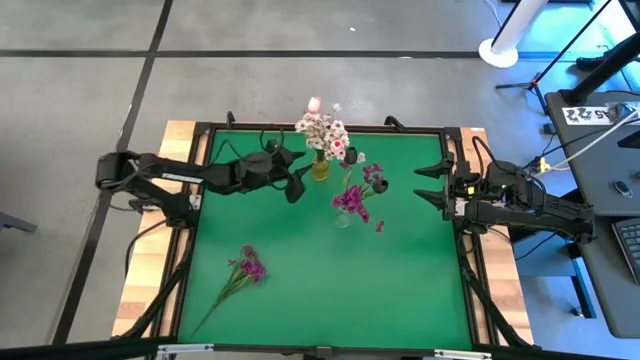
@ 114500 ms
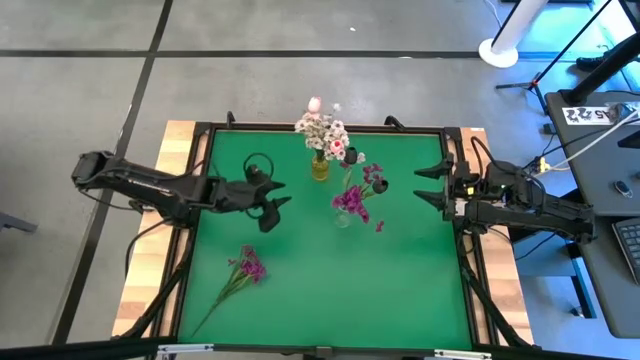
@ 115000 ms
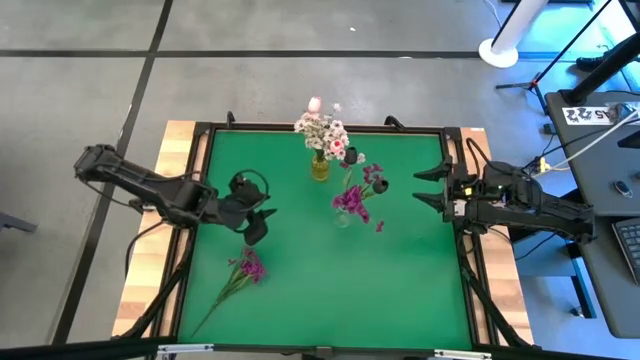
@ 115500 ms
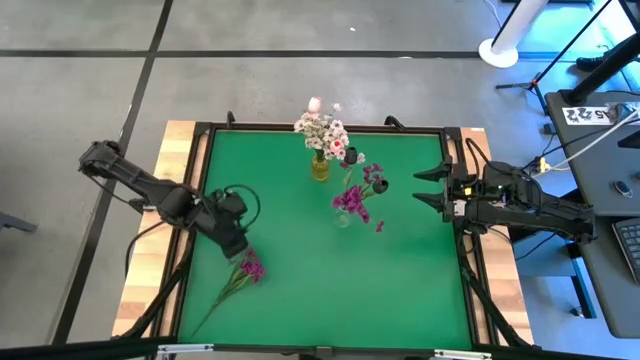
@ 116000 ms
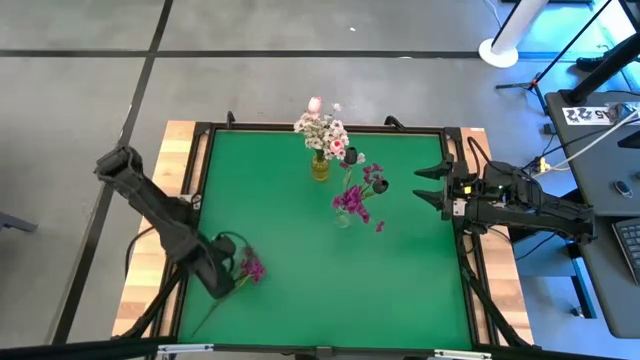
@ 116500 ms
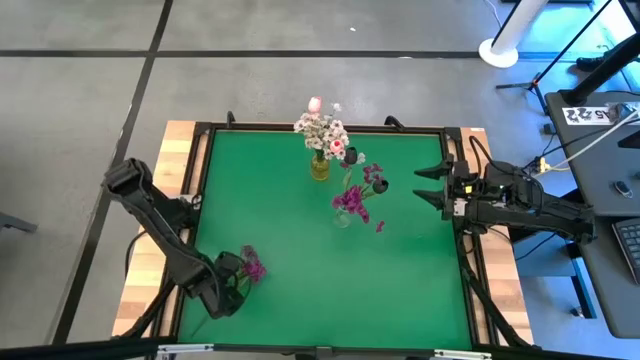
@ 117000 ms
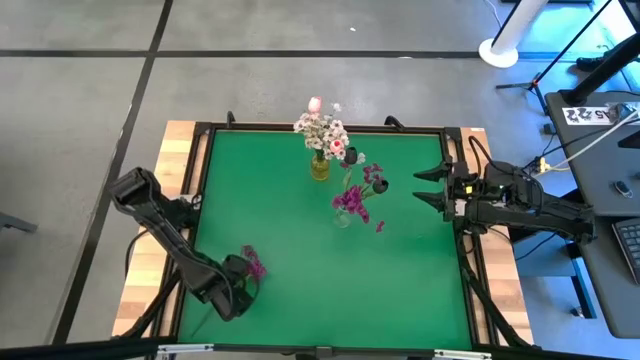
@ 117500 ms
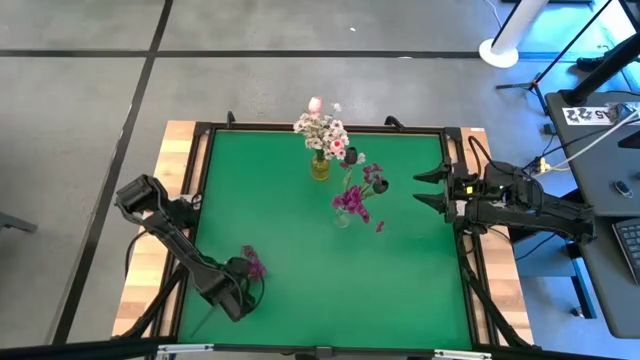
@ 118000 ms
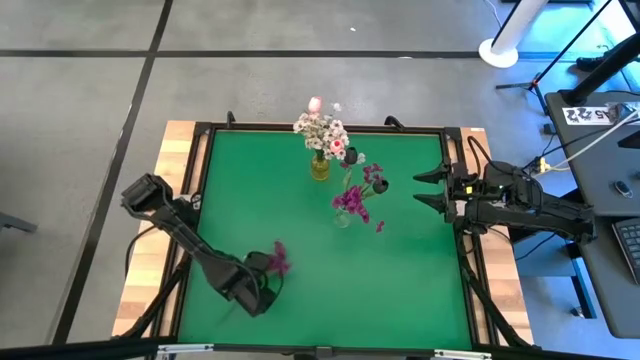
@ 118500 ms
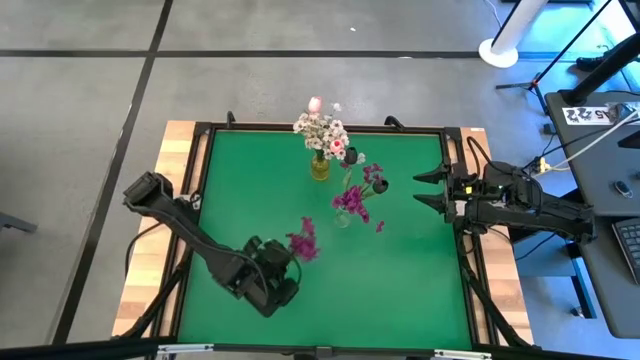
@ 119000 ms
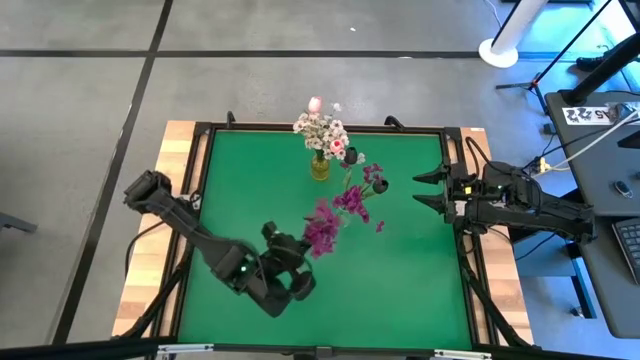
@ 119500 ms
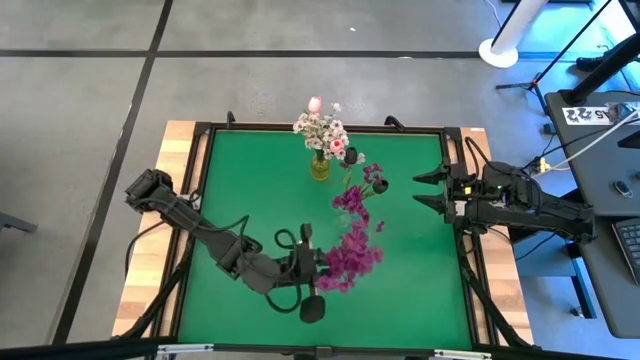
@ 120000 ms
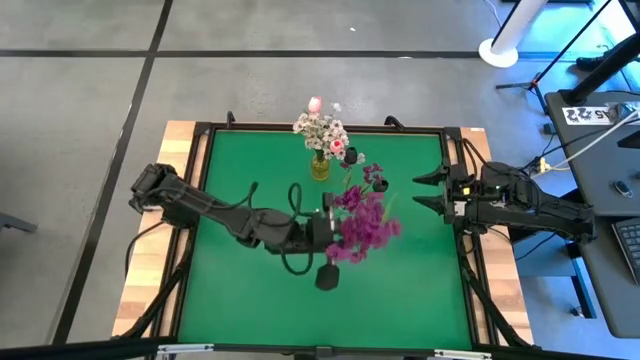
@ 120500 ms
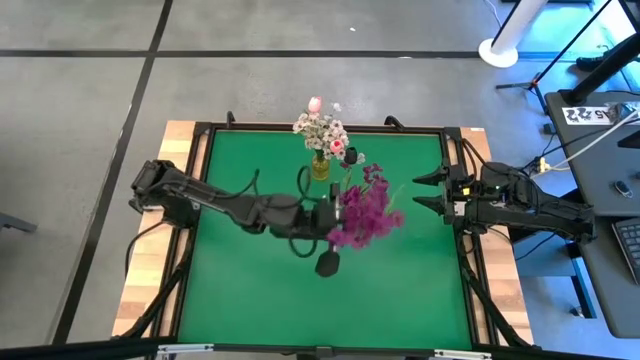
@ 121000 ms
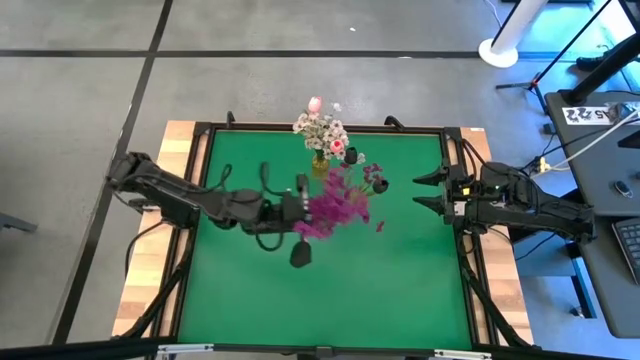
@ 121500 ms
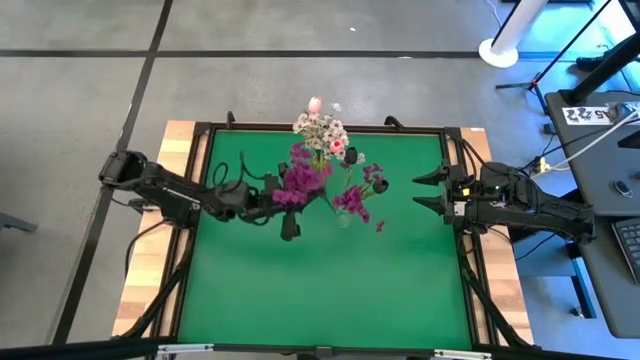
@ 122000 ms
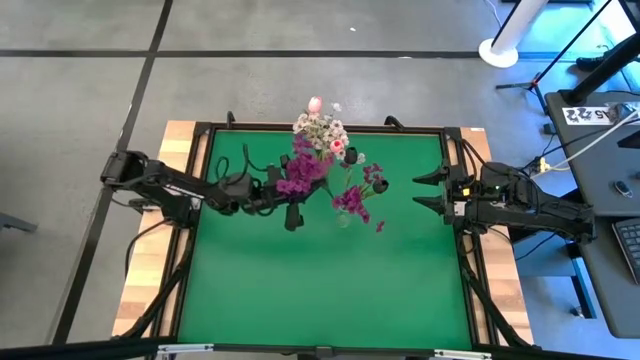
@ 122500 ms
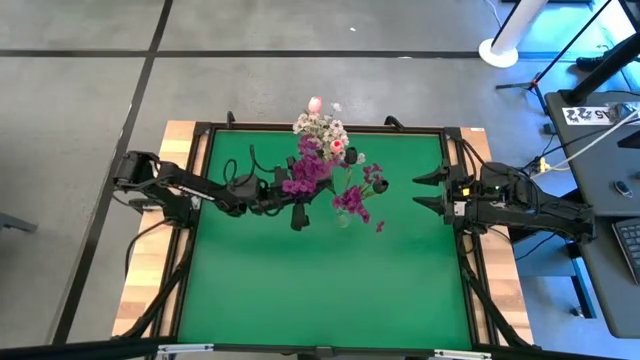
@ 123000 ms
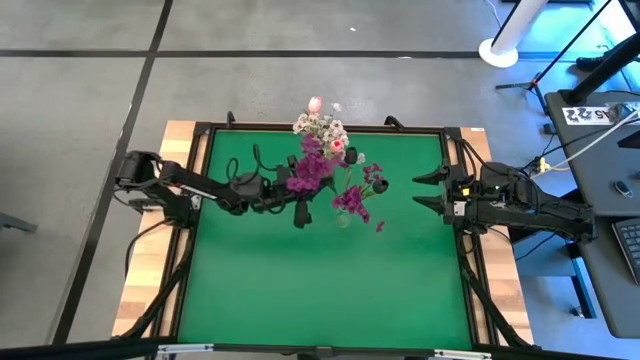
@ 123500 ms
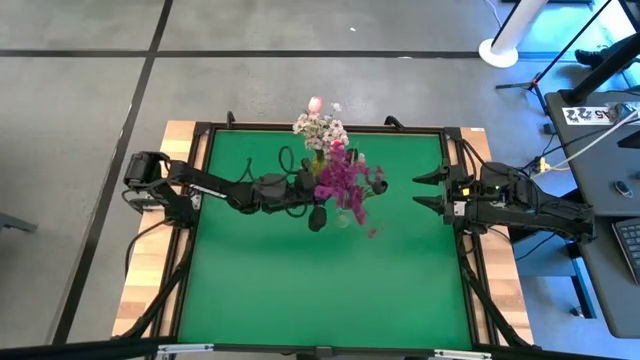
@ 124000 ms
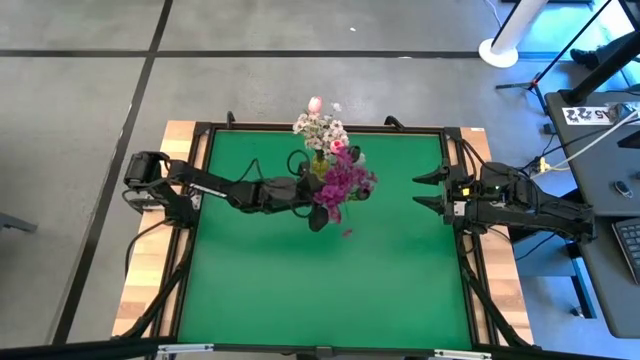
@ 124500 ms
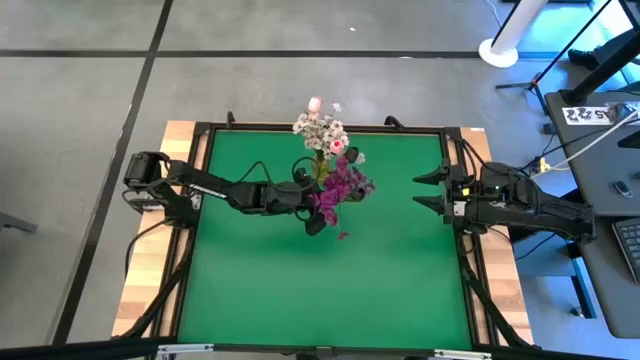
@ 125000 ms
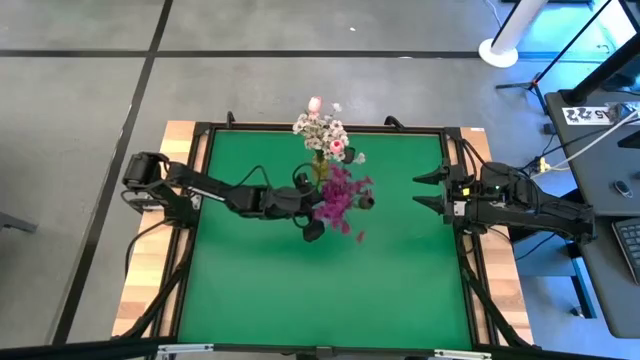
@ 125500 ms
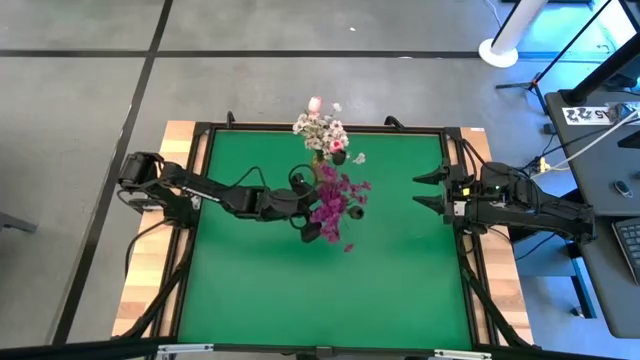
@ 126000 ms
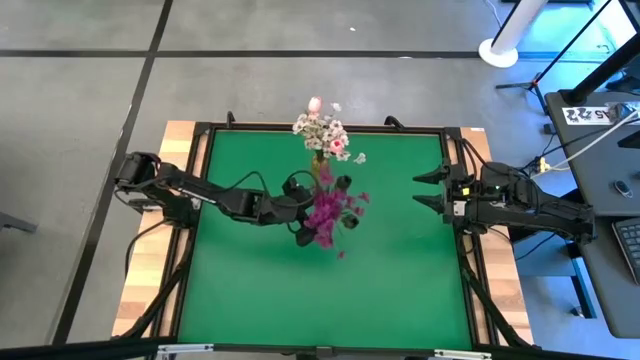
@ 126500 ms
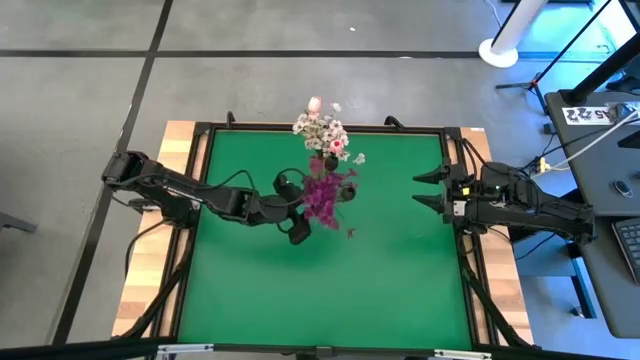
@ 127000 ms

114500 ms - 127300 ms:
Task: Sort flowers into vase by color
Put the violet flowers into the transparent vase

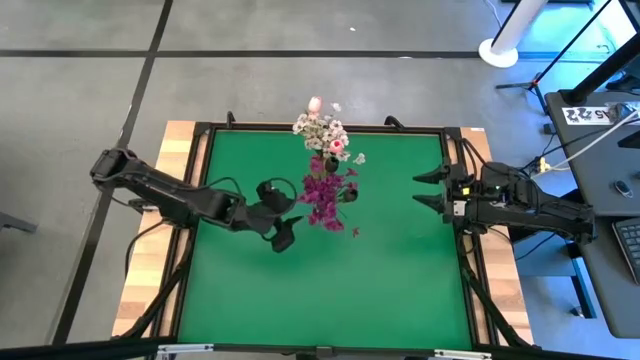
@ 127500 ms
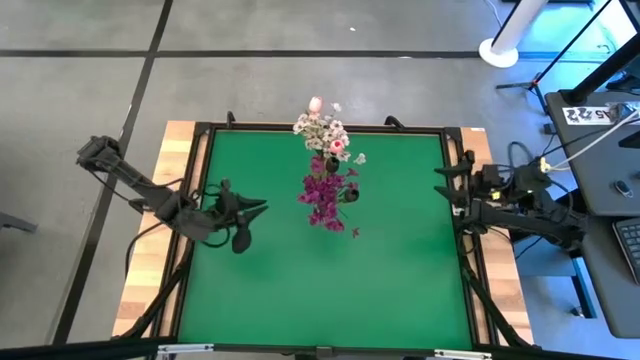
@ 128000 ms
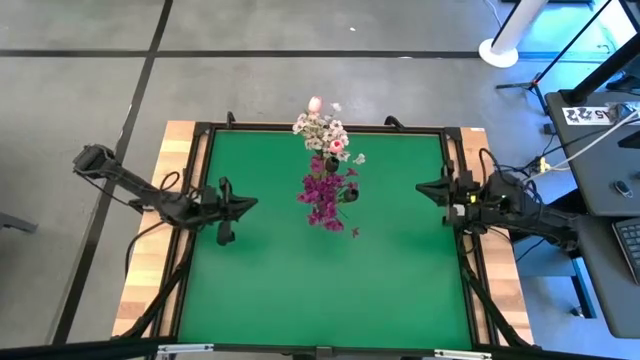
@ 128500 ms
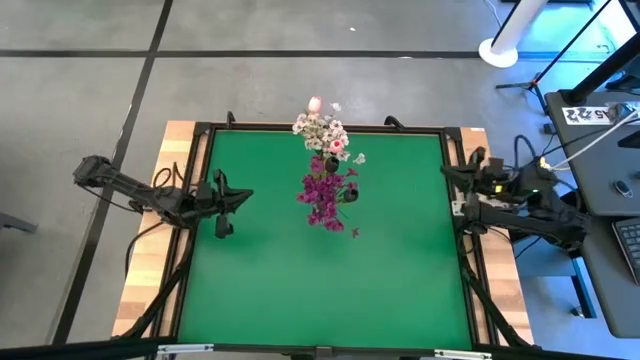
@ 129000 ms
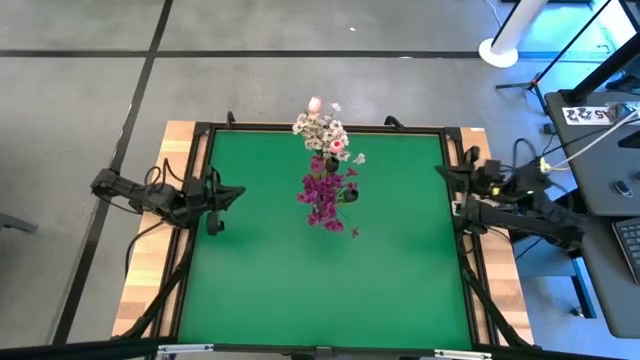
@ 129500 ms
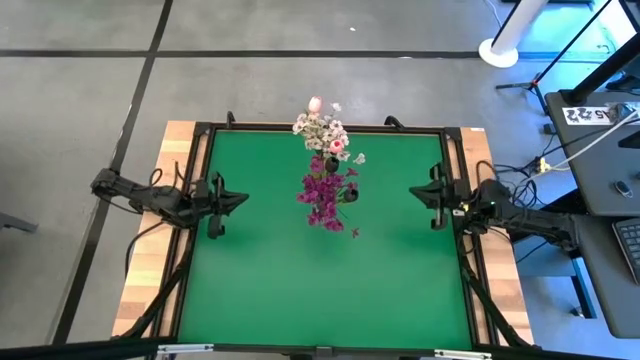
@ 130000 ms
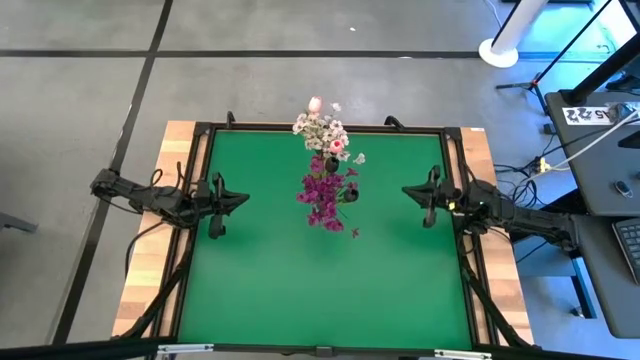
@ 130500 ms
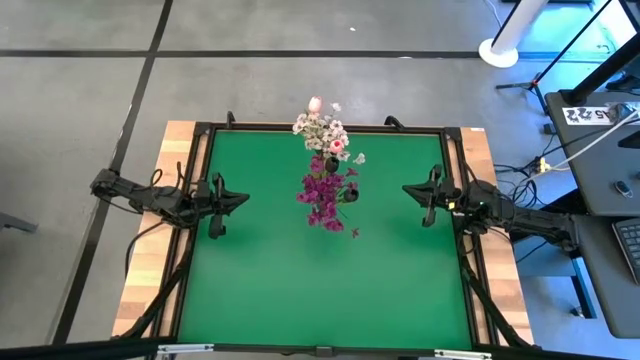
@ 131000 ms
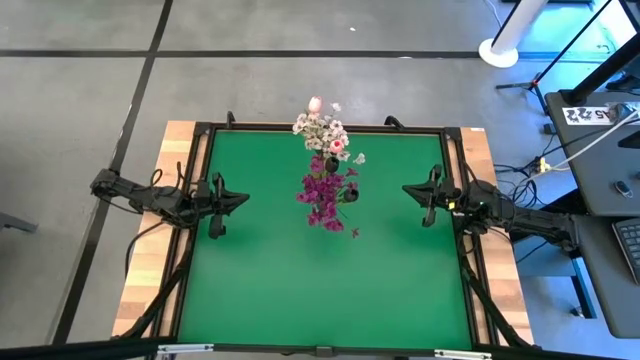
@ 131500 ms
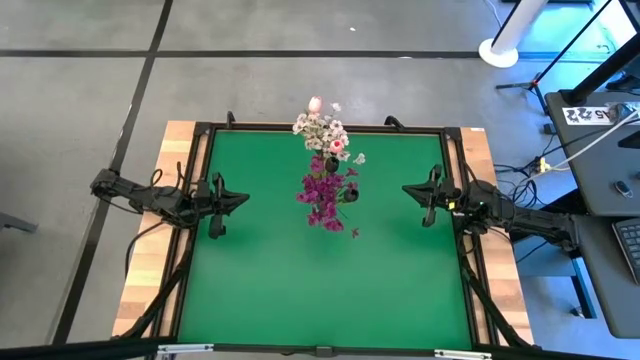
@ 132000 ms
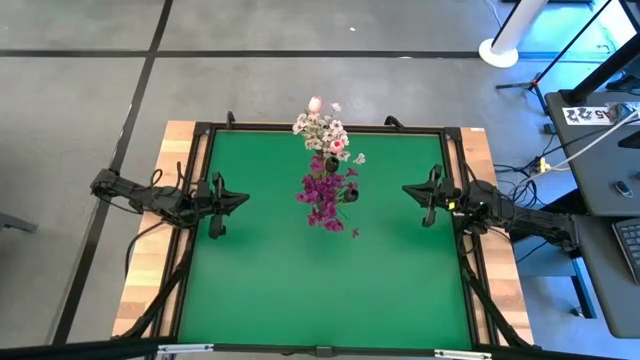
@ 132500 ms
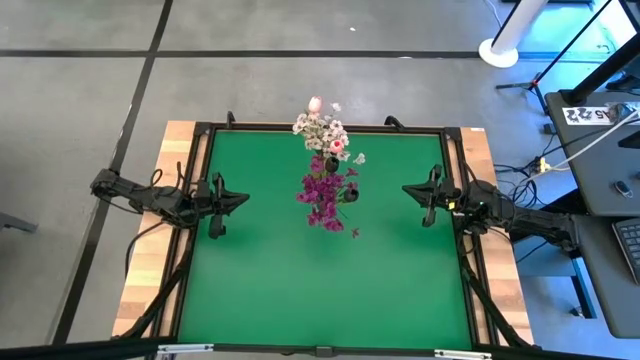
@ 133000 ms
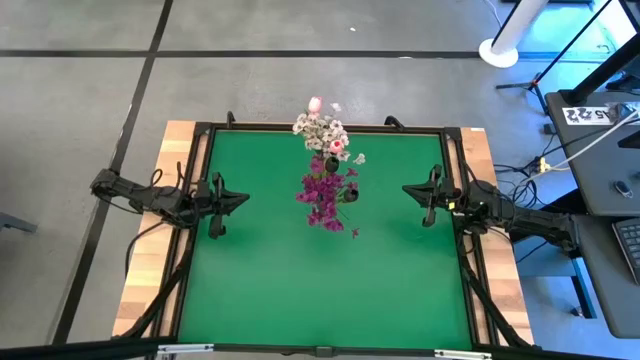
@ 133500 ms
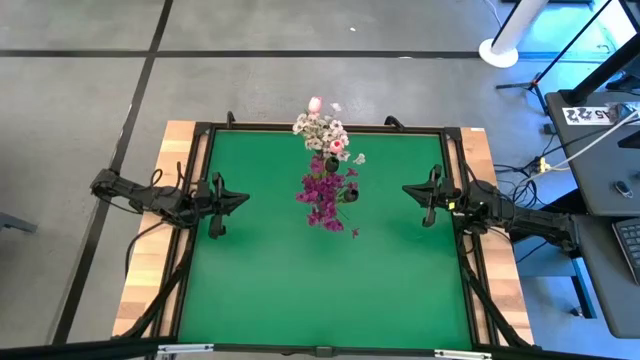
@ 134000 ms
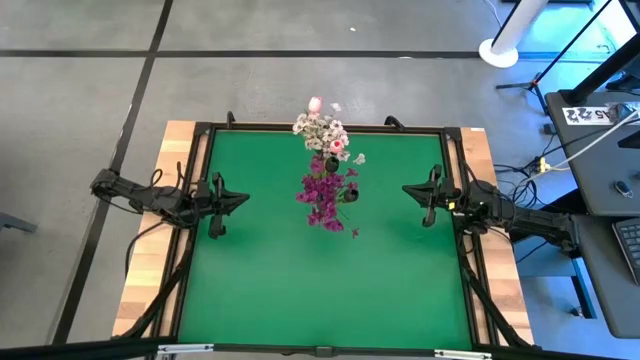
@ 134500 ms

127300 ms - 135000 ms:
Return to Home Position

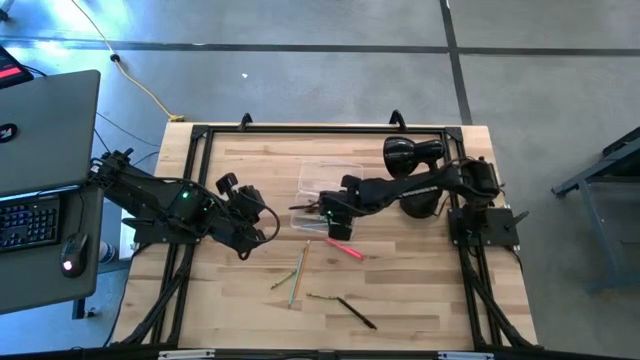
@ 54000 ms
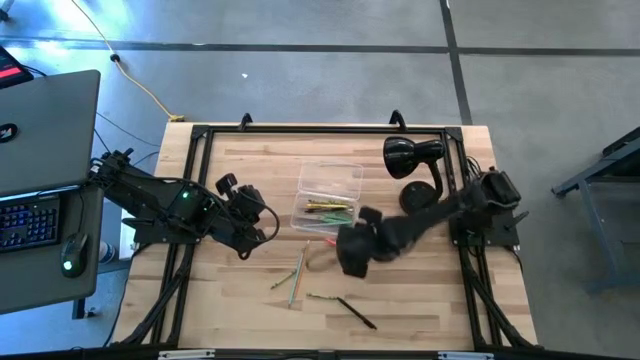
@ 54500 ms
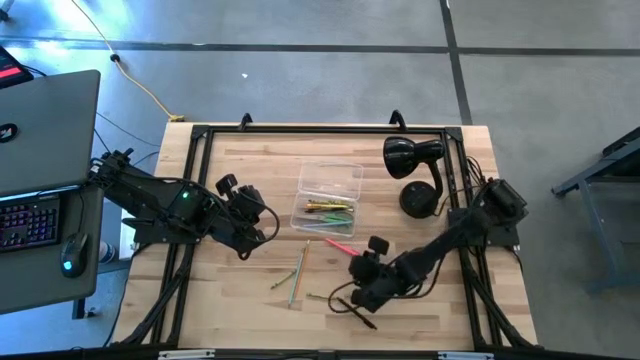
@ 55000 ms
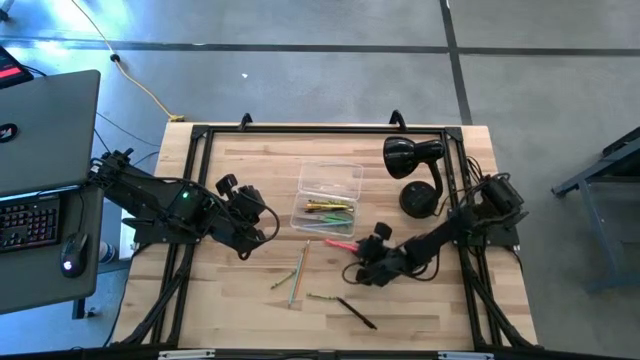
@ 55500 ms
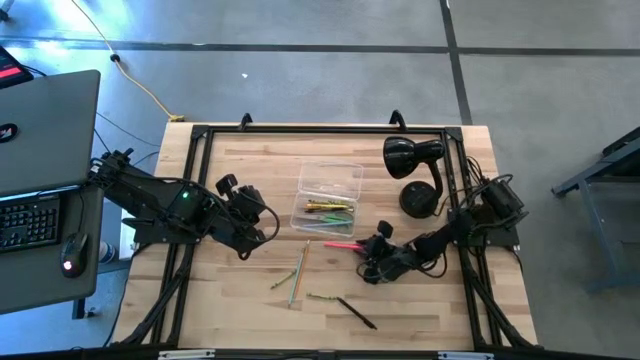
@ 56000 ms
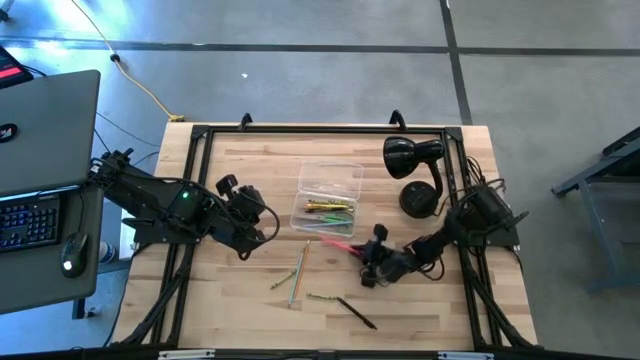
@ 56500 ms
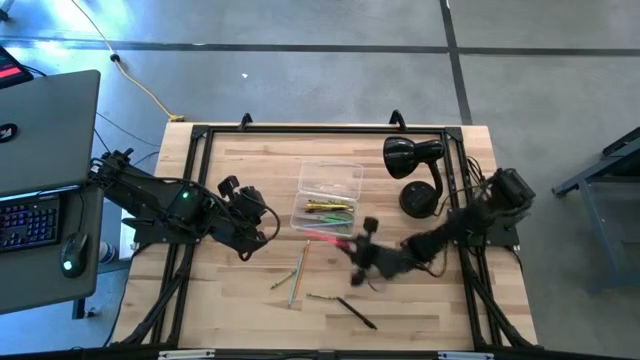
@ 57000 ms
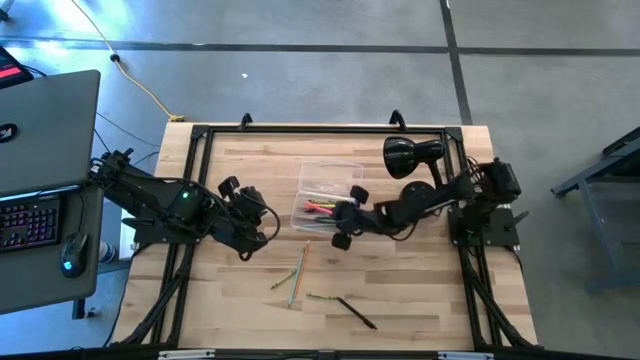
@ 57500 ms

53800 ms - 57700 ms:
Task: Pick & place school supplies into a supply box
Put the pink pen into the transparent supply box
